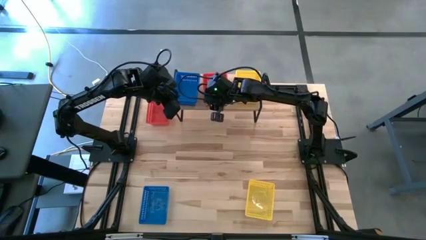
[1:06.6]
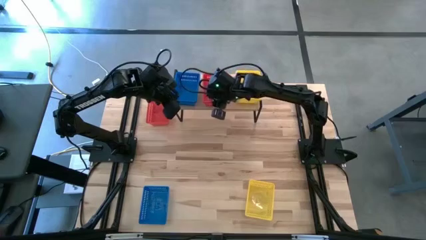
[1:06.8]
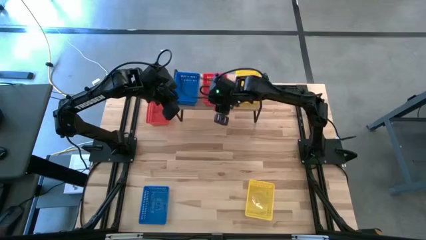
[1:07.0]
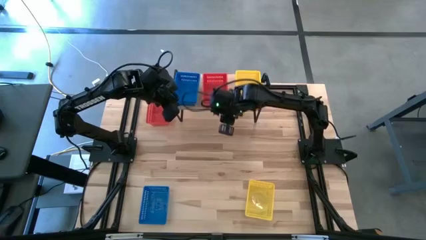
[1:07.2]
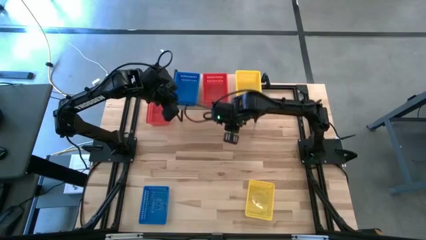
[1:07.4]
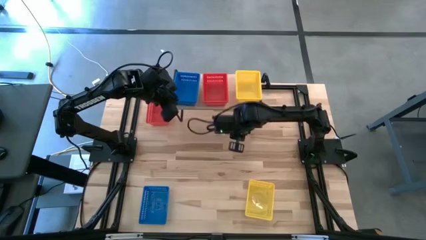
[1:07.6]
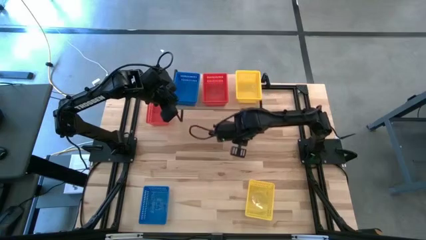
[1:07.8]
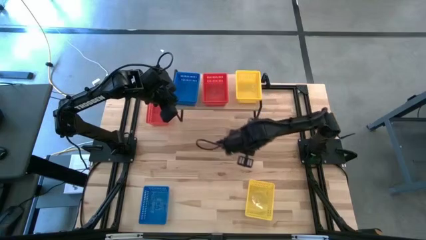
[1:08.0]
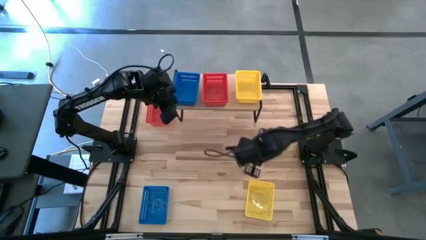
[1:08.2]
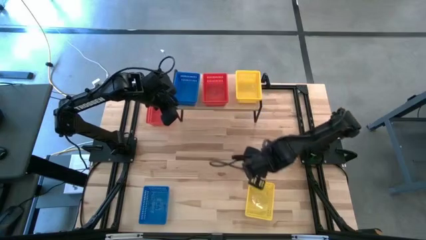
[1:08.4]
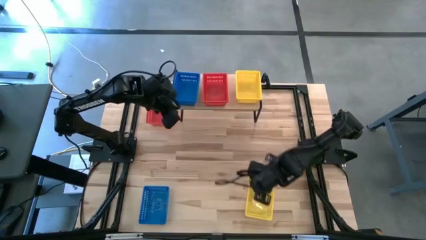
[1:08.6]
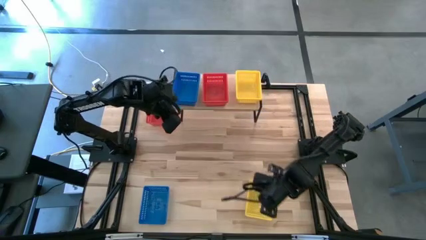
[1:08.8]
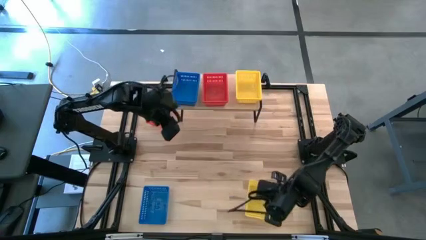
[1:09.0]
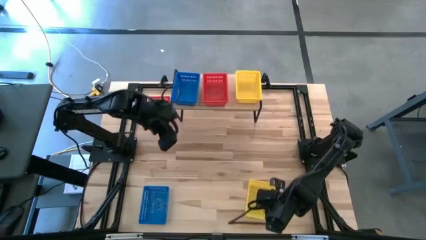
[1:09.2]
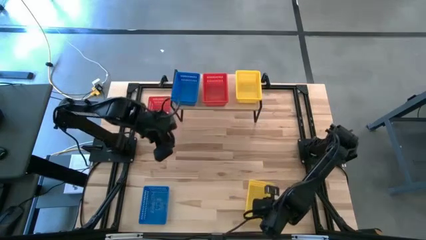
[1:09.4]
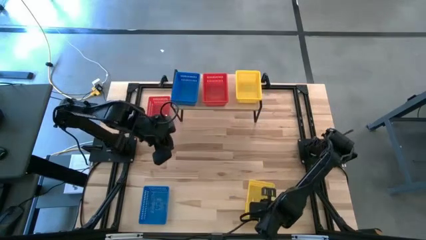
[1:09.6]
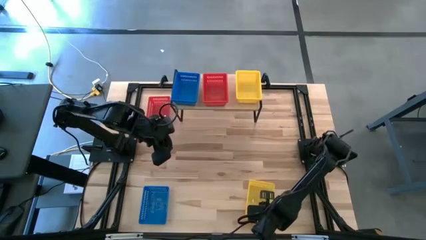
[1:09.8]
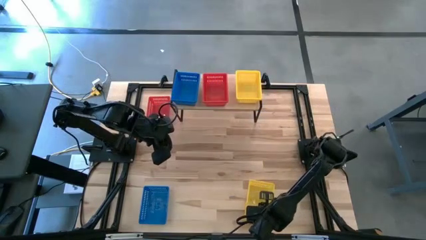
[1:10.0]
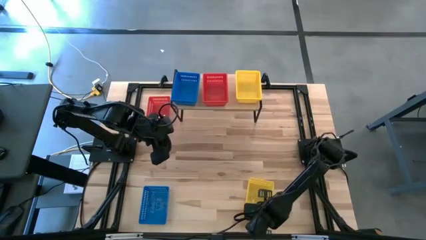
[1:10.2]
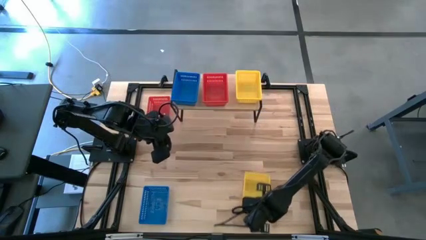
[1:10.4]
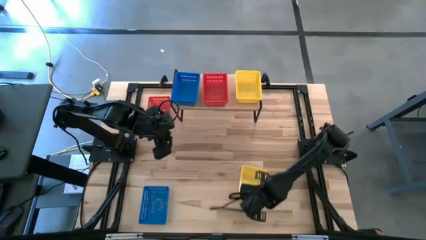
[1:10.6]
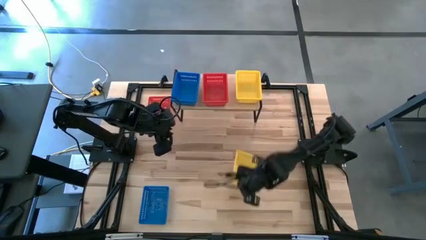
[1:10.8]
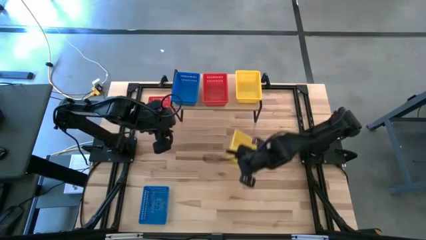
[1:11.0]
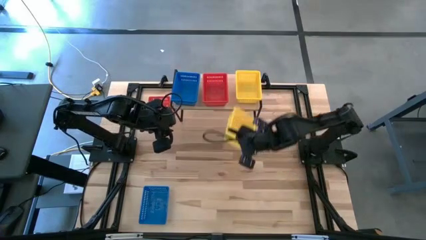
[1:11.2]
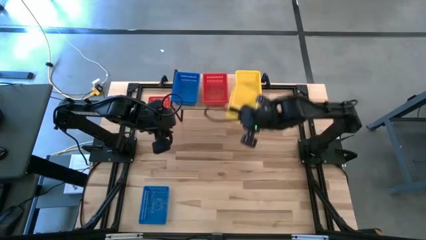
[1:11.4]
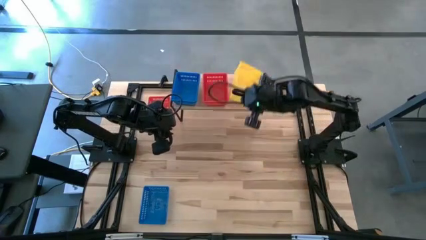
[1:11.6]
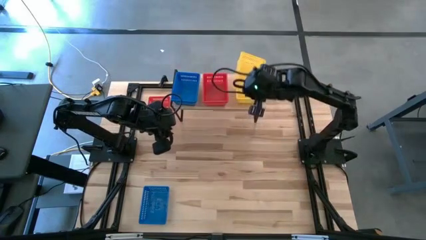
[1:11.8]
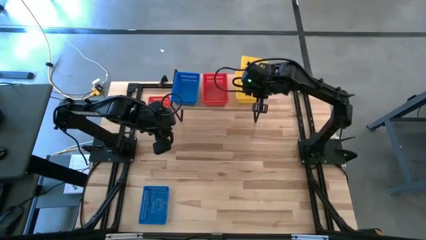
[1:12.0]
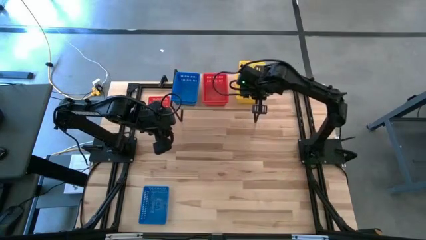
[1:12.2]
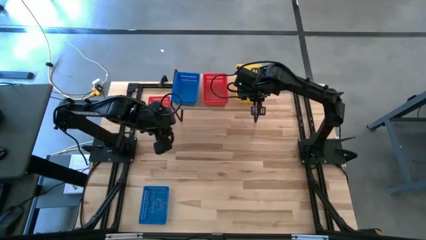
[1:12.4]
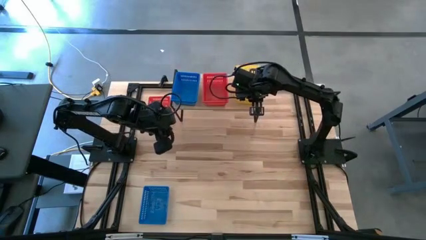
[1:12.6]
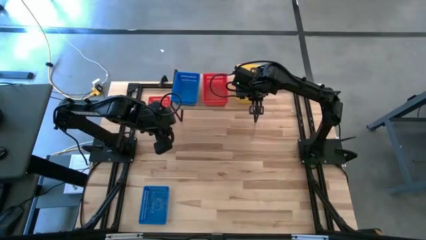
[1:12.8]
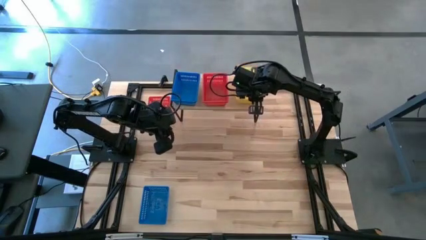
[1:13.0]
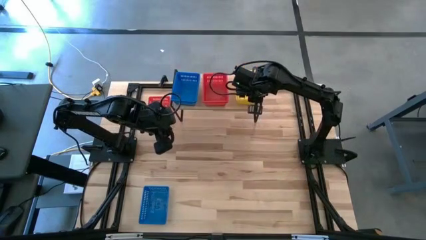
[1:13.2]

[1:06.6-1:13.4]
Task: Stack baskets on shelf by color
Stack the yellow basket into the other yellow baskets on the shelf

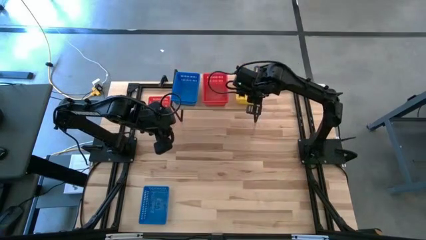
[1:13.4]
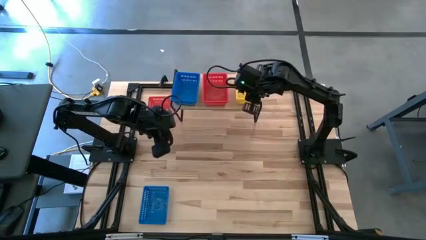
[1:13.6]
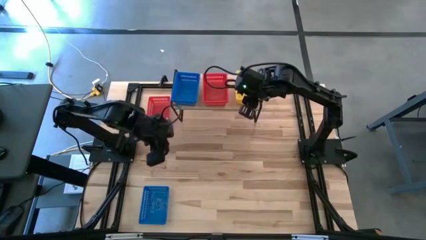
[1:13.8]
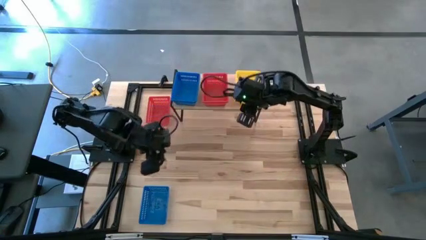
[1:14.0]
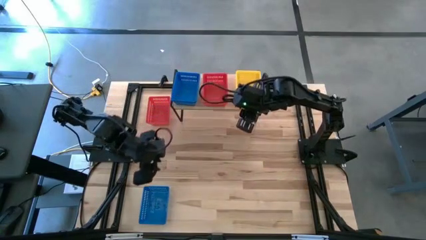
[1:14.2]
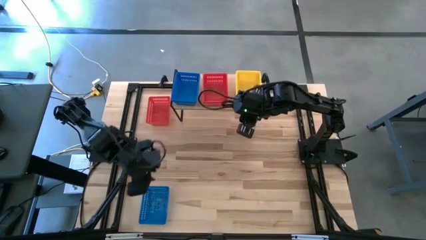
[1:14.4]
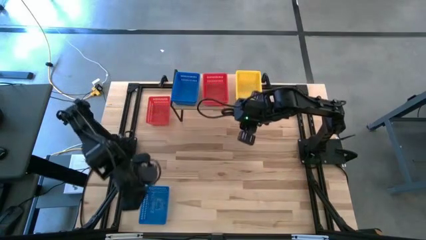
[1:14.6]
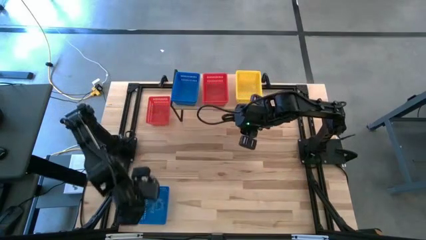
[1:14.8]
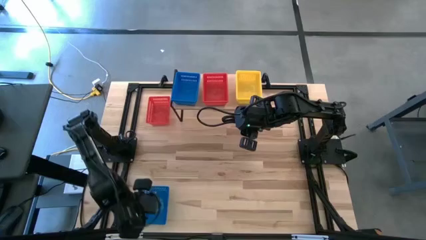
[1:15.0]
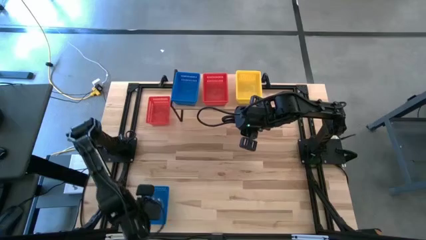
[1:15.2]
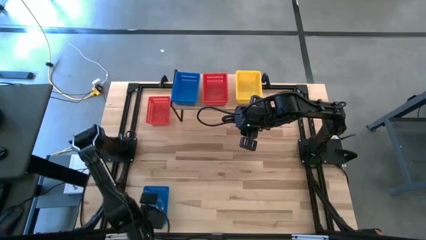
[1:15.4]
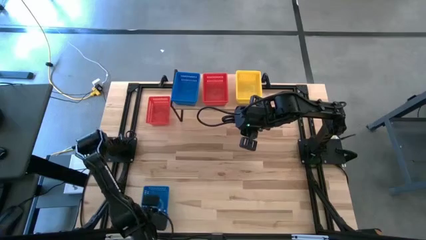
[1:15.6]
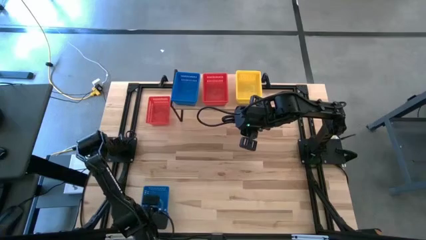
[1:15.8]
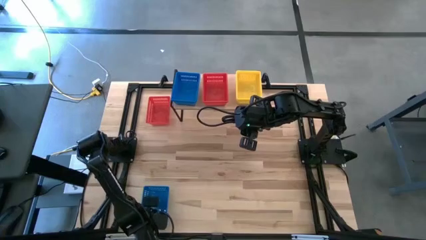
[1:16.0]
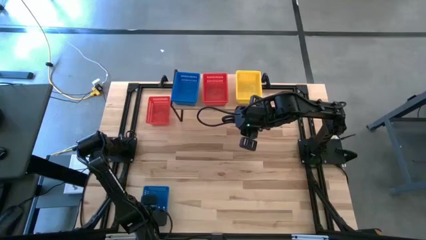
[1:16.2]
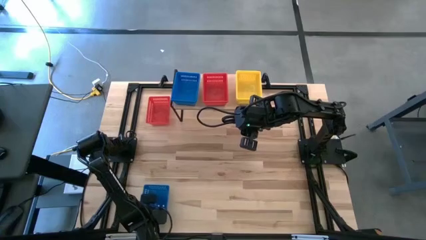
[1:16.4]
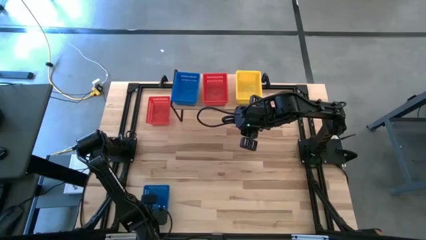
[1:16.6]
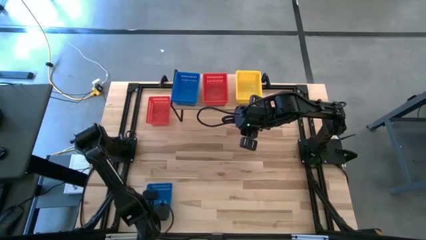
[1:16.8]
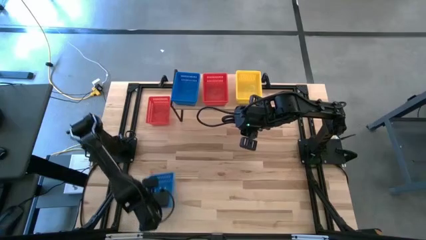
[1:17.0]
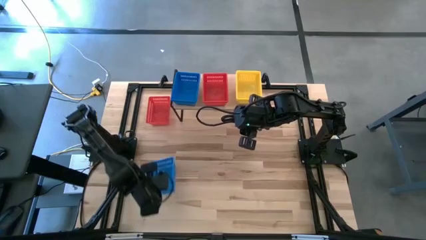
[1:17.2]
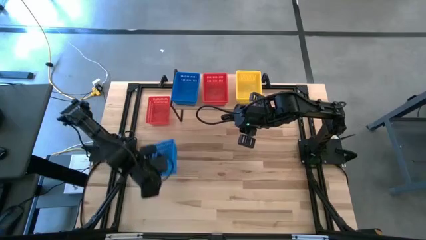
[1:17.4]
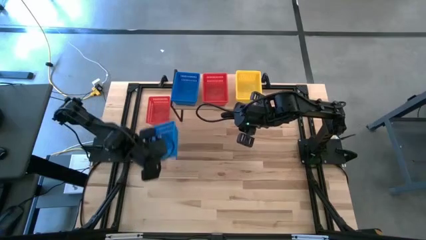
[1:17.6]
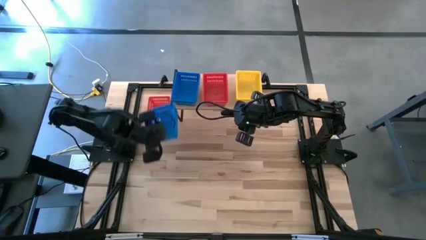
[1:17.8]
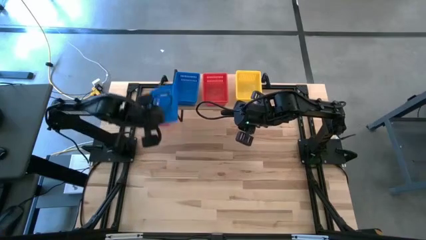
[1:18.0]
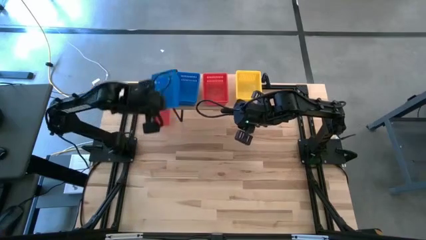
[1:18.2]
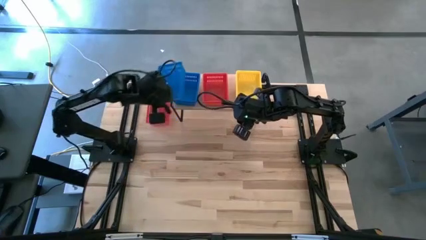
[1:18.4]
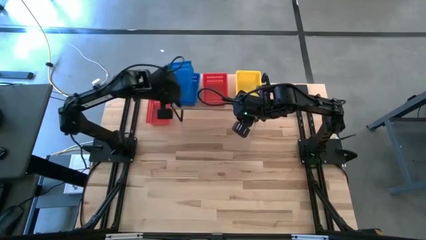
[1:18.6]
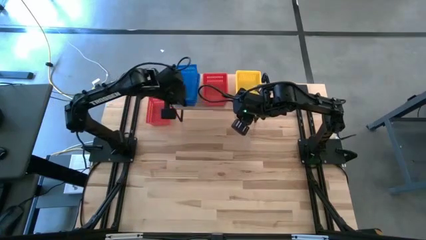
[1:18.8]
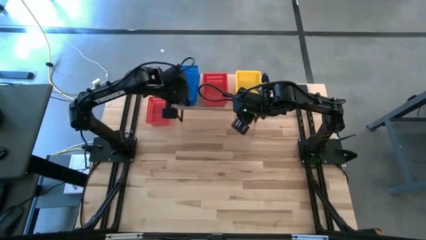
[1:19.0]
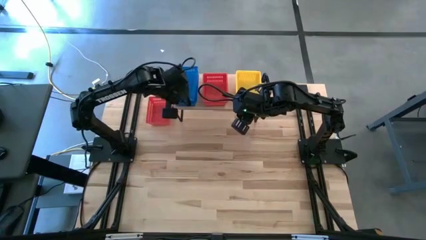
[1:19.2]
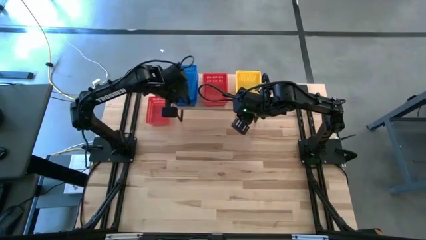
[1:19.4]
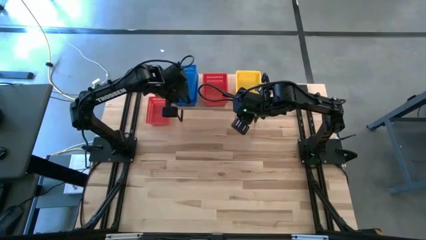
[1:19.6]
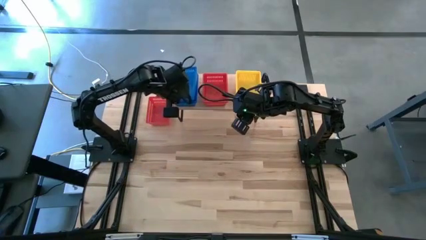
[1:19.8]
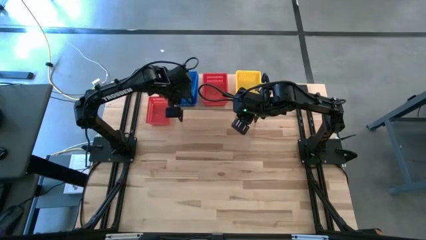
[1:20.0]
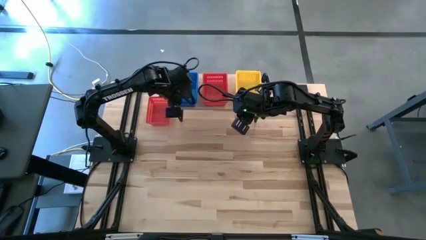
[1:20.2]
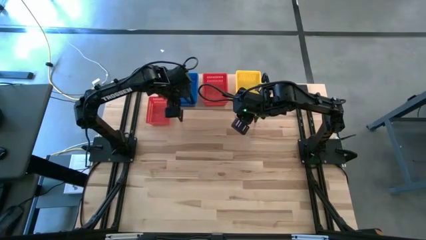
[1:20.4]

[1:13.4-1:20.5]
Stack the blue basket into the other blue baskets on the shelf
